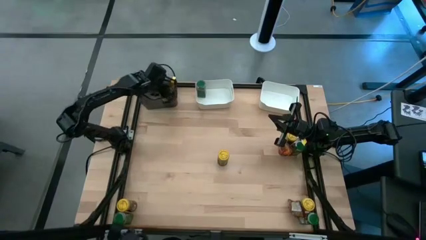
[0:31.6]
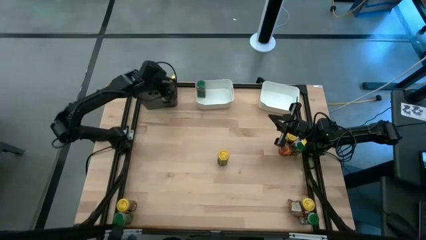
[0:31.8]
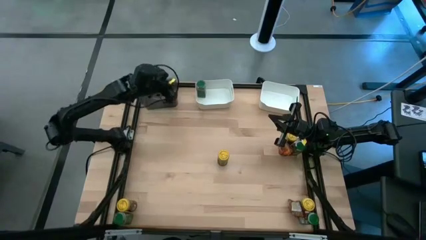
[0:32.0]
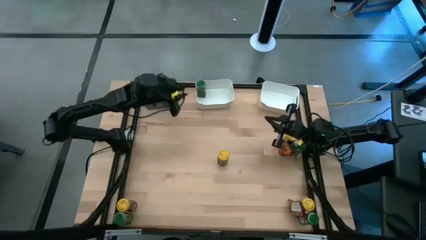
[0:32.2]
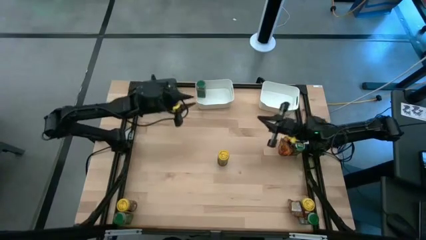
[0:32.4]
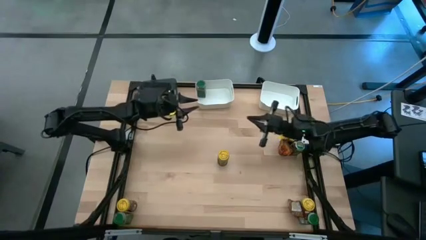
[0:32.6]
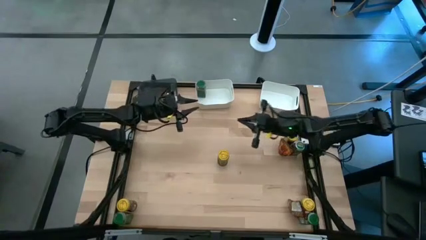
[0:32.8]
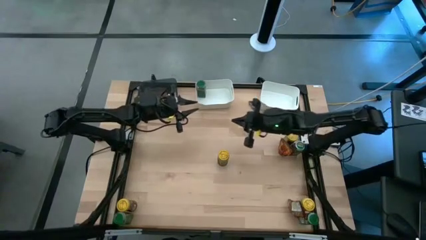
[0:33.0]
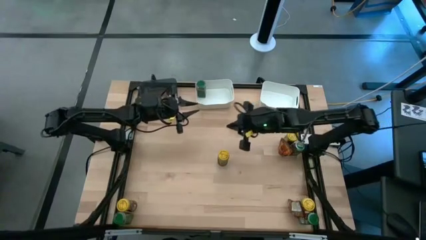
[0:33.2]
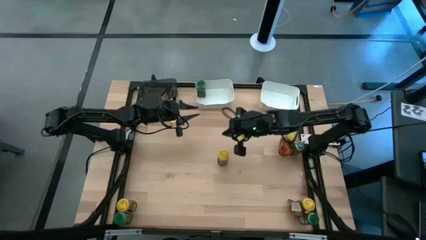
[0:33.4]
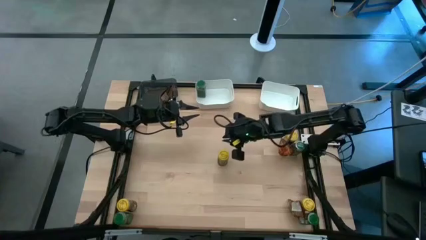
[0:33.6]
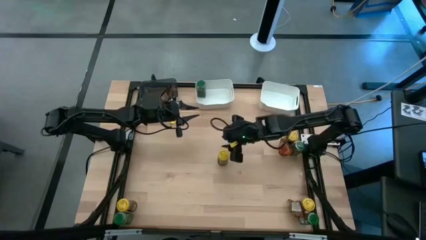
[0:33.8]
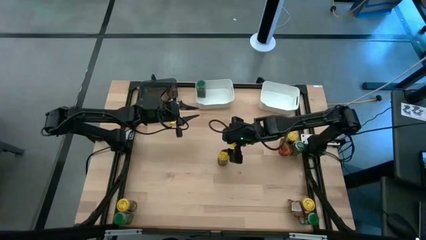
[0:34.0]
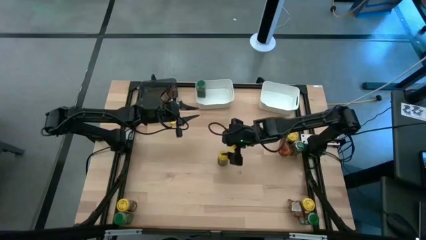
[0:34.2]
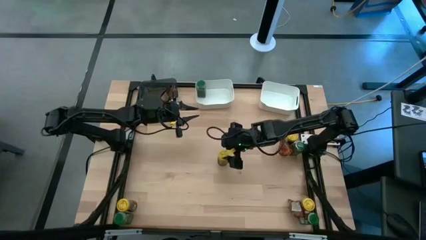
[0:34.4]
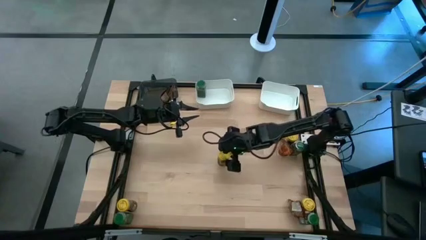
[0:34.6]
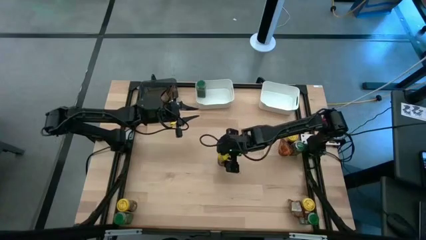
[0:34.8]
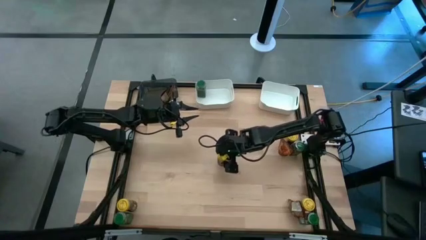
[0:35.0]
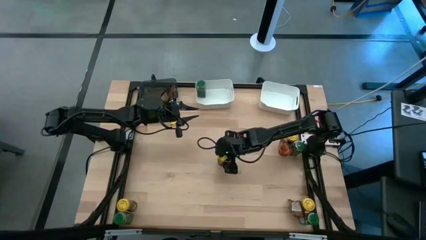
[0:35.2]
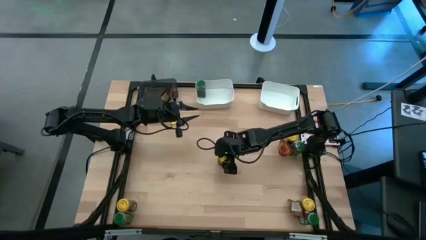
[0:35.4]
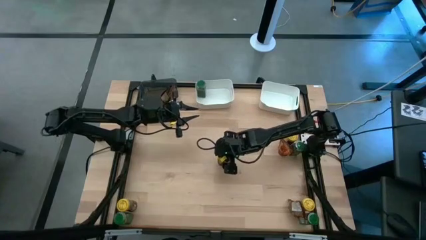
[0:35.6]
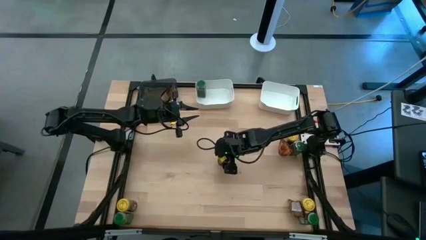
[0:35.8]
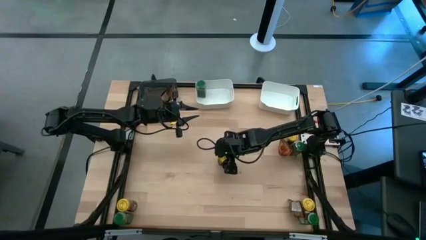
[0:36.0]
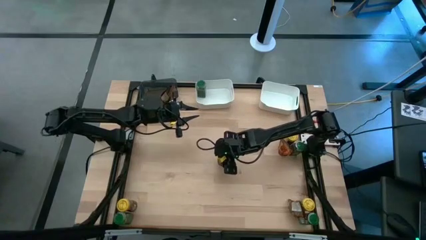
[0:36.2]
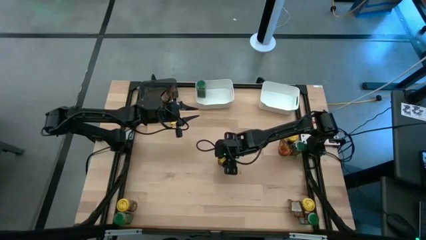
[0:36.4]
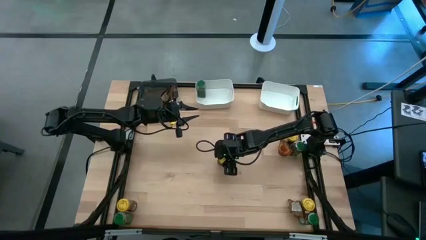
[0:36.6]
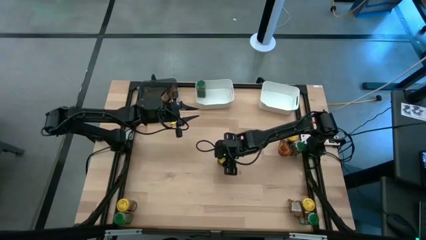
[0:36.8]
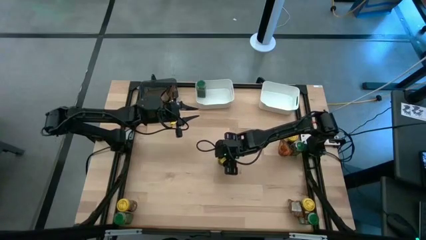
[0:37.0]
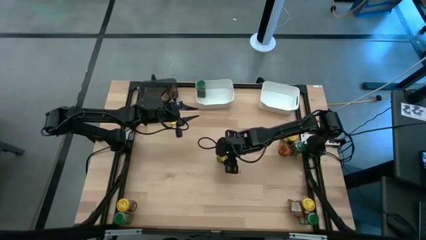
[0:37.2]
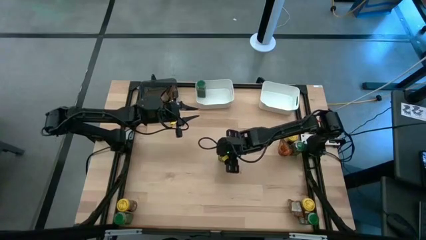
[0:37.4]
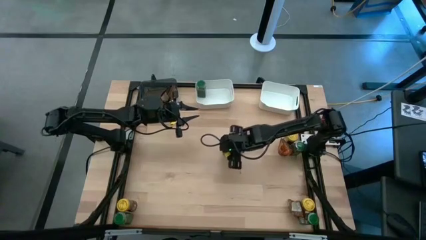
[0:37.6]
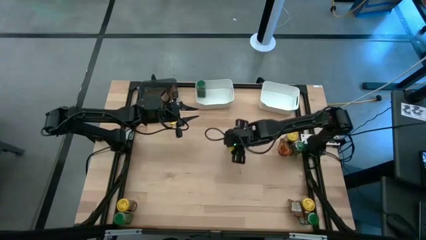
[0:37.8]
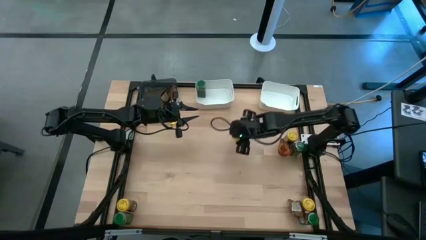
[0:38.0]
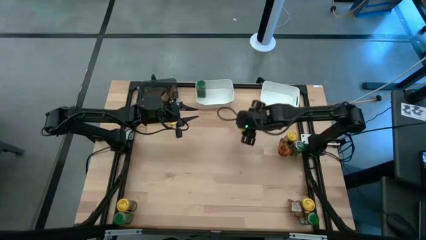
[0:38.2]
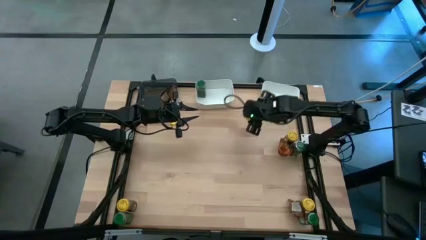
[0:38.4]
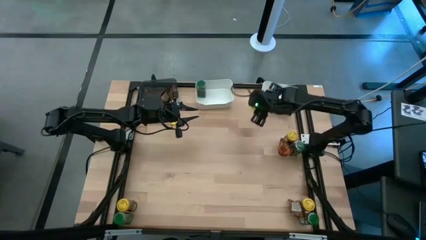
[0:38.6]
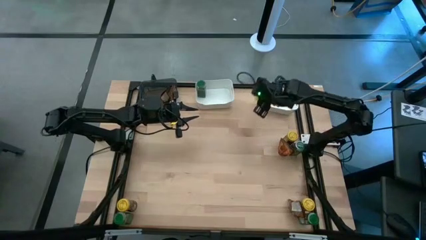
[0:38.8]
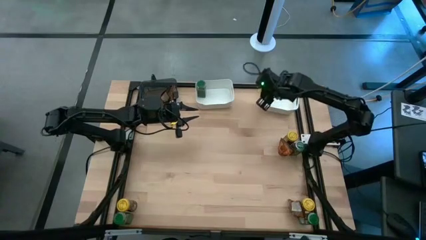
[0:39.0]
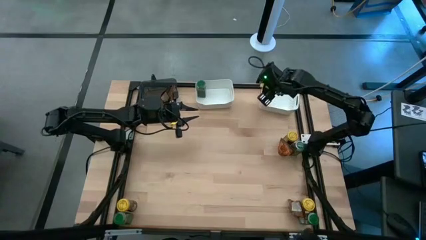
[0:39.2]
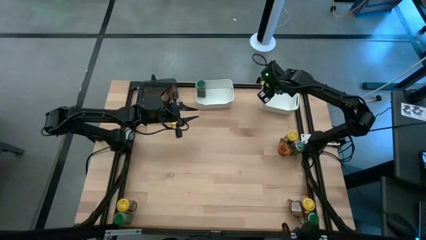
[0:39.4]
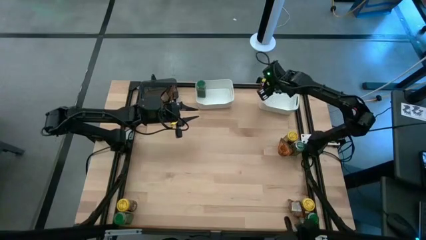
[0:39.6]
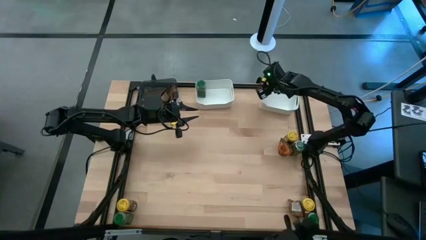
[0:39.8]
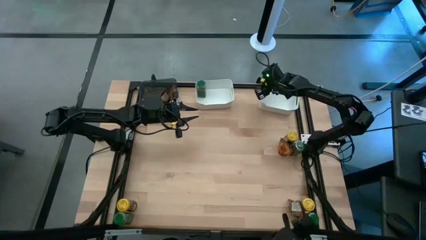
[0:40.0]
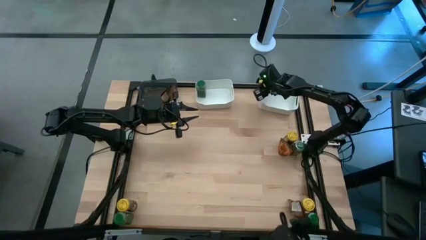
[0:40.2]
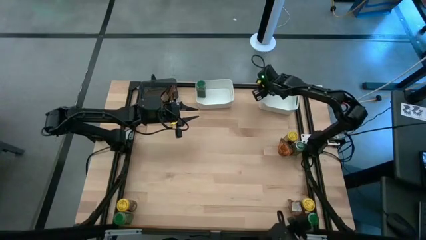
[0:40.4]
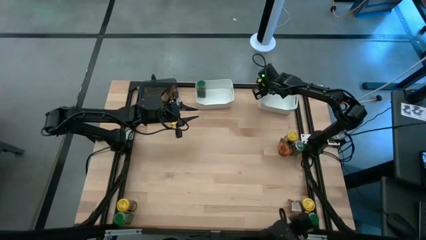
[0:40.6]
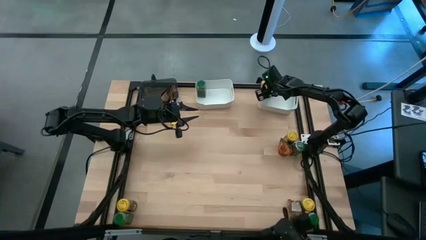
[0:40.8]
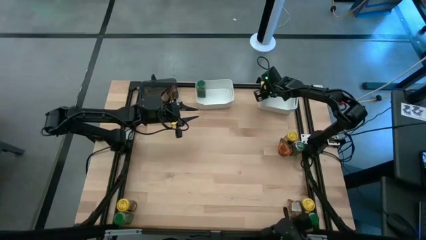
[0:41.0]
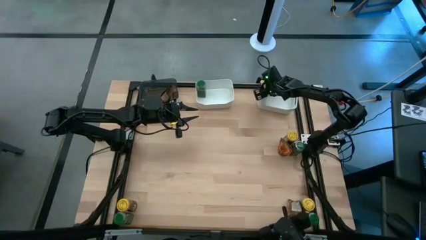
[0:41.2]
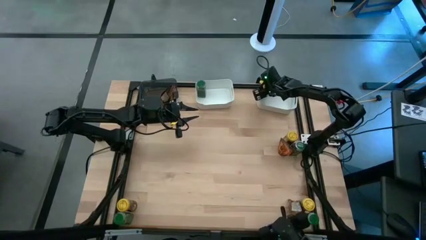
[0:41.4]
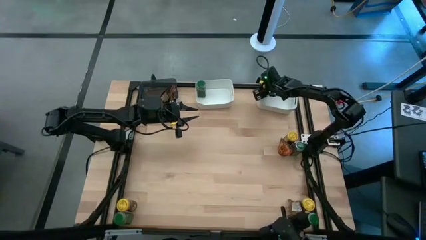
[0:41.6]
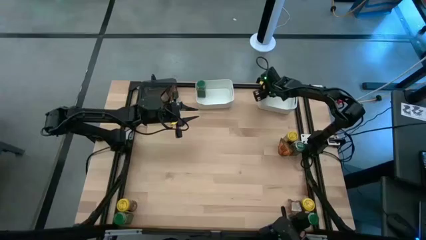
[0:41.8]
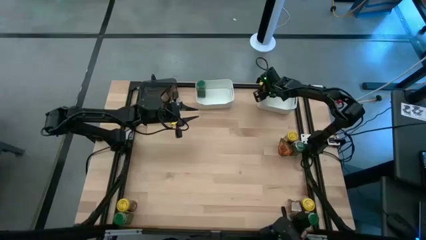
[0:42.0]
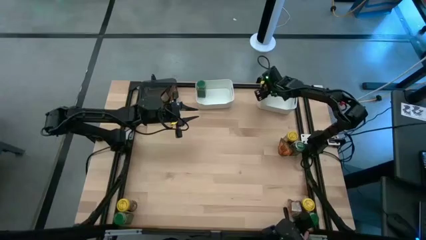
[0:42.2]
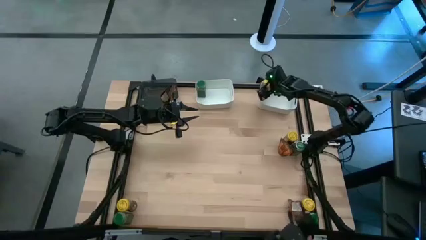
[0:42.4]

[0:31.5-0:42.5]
Task: Sort spices by type
Put the center yellow seasoning bottle into the right white bin

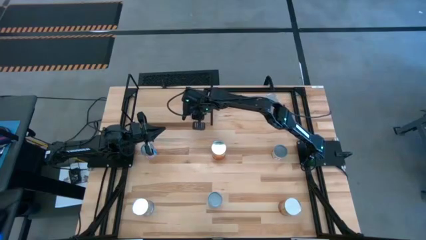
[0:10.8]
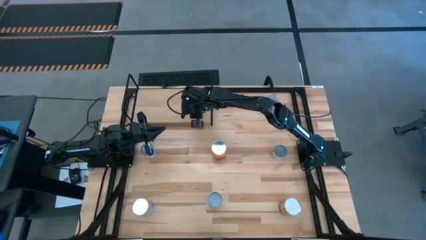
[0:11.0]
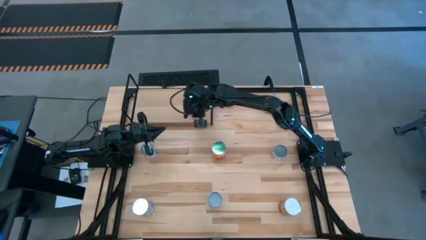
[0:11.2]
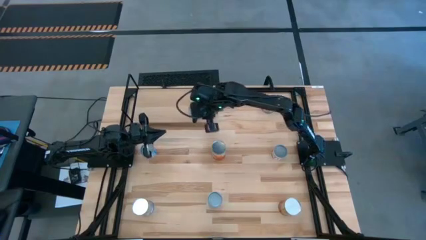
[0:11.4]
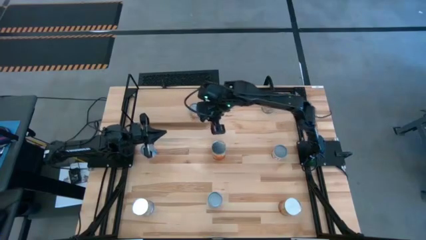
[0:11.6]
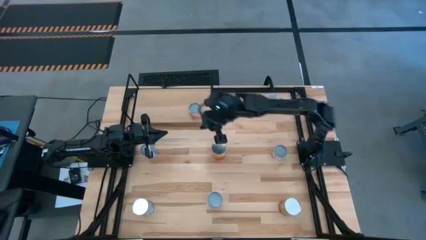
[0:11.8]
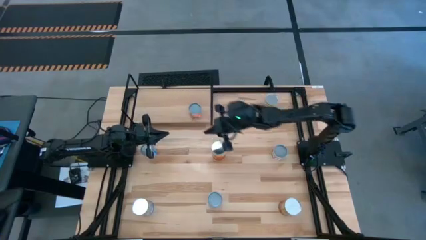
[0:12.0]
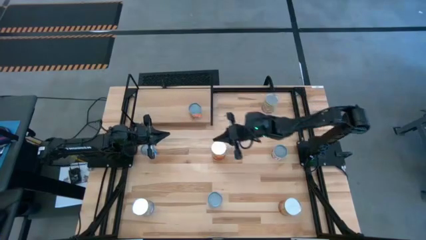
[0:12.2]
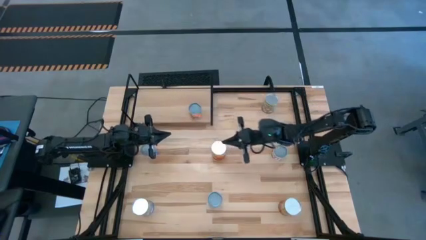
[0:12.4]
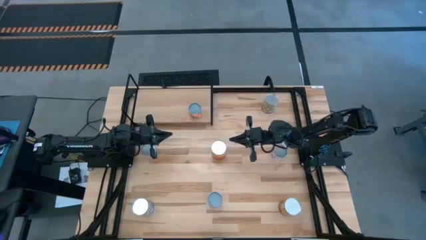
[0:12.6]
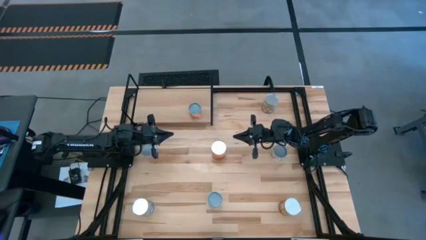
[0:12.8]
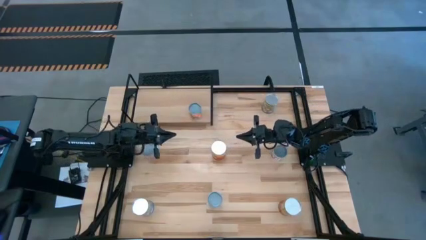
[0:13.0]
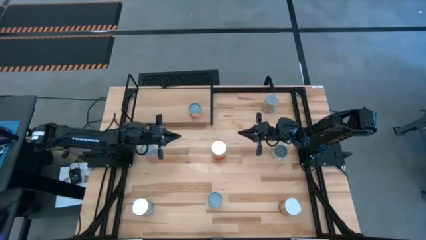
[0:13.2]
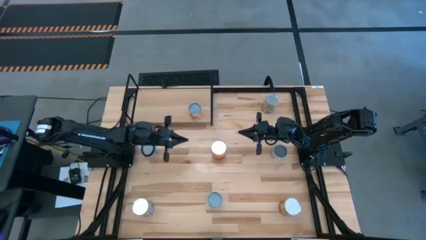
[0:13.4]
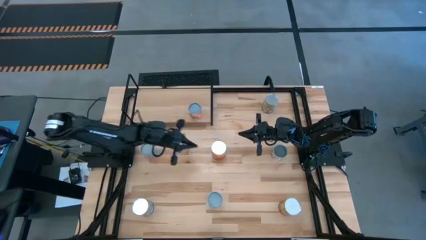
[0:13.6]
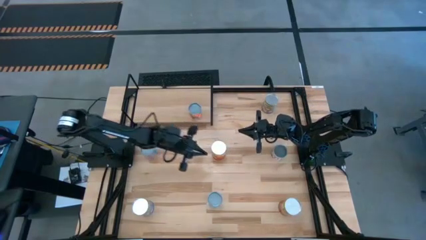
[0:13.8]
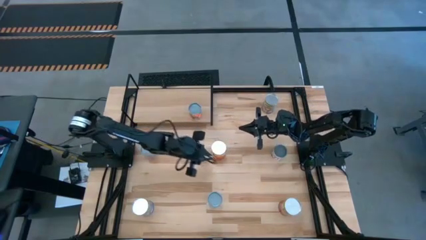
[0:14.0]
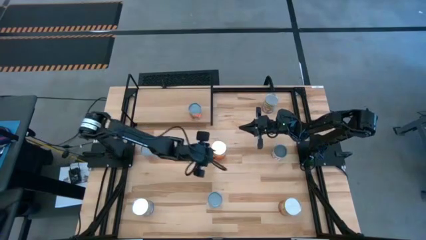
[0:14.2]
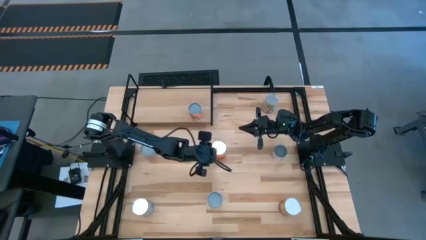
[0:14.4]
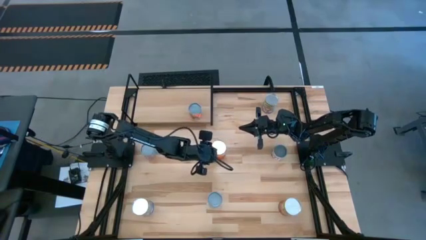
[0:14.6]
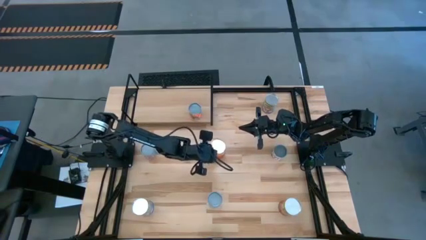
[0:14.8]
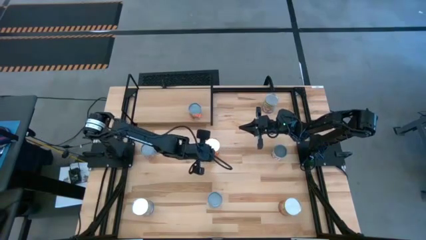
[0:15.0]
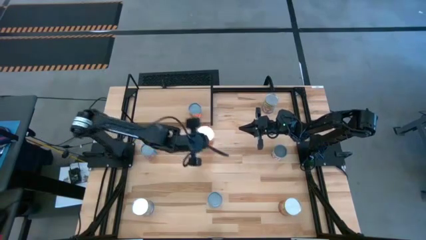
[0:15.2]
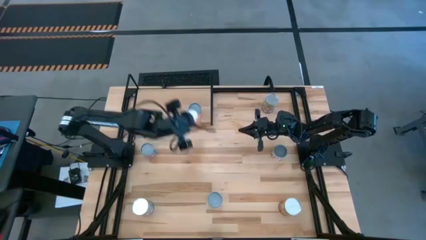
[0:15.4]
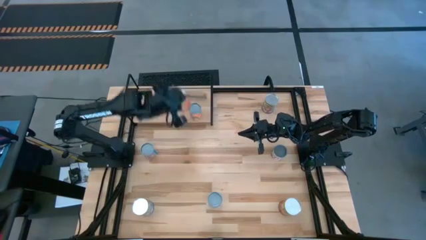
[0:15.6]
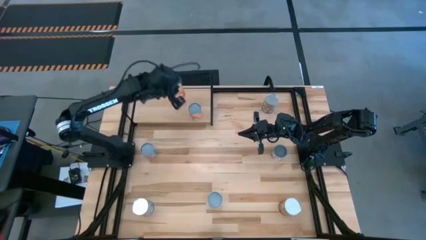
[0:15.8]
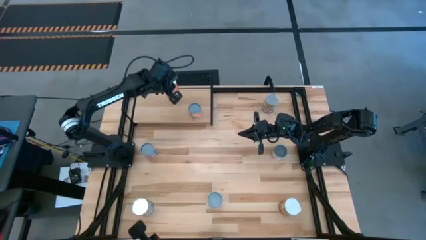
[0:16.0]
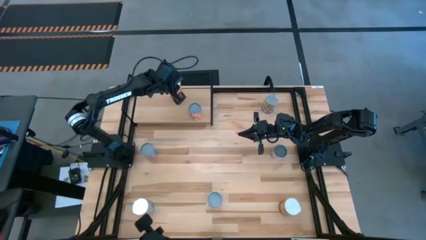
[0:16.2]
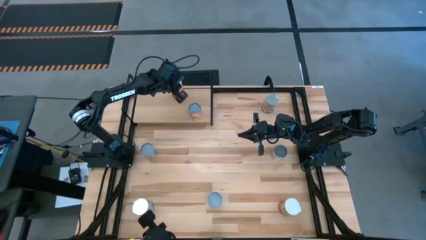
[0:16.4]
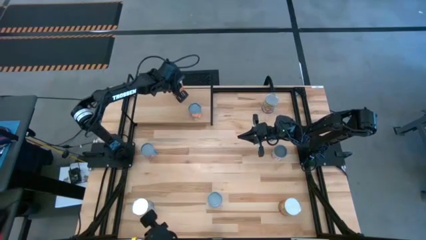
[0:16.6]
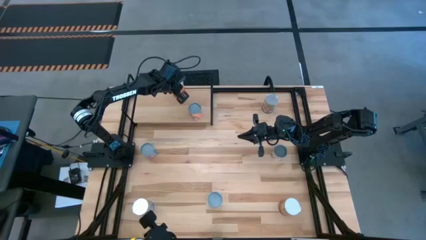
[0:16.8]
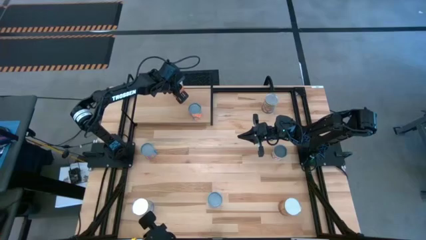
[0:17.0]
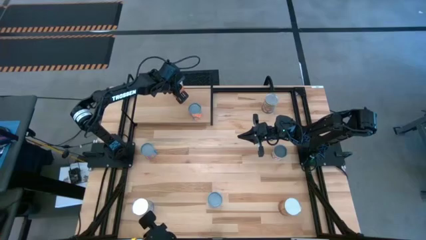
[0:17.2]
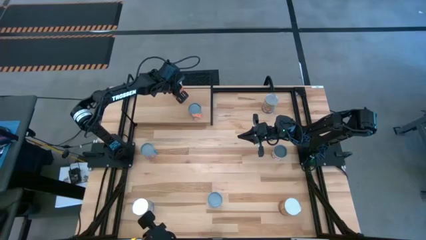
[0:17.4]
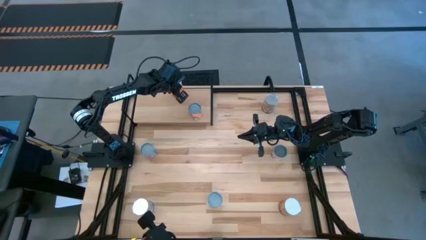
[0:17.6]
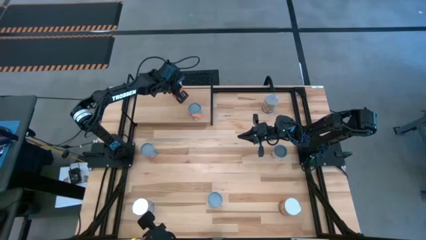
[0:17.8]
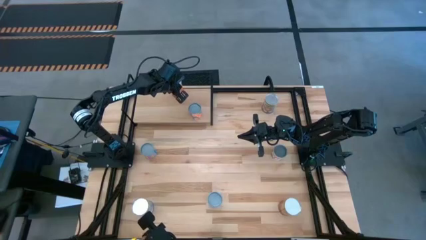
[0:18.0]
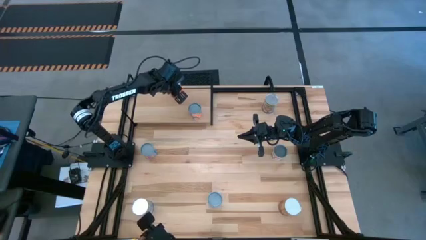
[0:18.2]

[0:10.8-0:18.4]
Task: Pick and place cans onto a shelf
Put the top canned corn on the shelf
